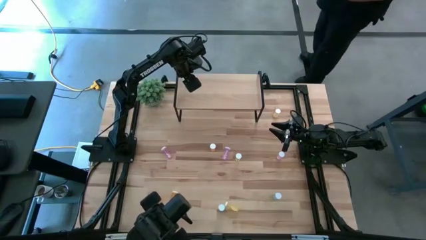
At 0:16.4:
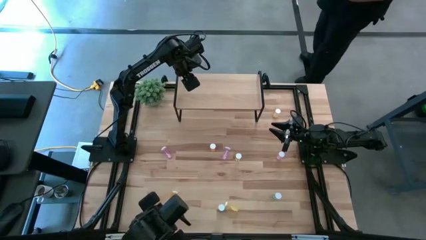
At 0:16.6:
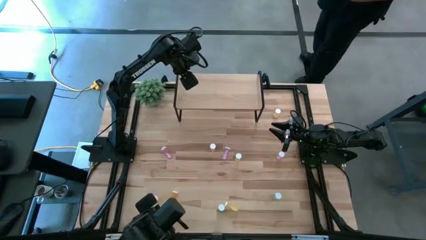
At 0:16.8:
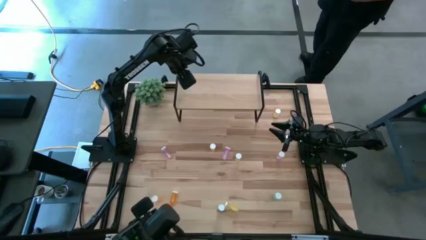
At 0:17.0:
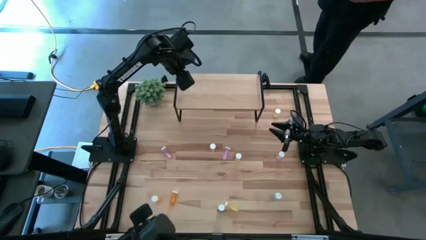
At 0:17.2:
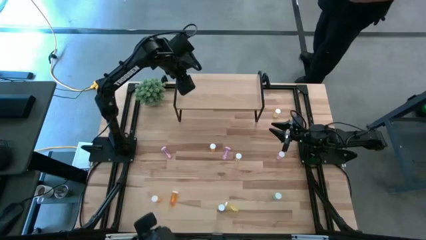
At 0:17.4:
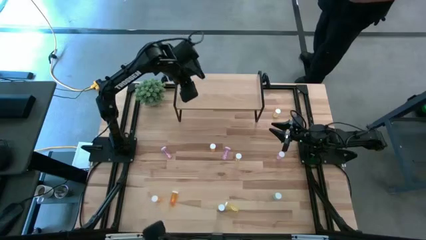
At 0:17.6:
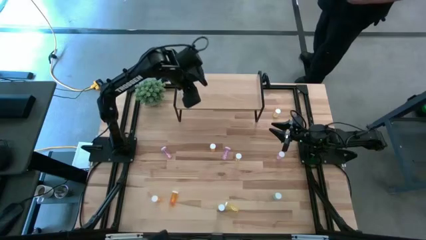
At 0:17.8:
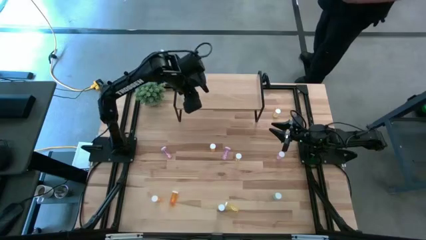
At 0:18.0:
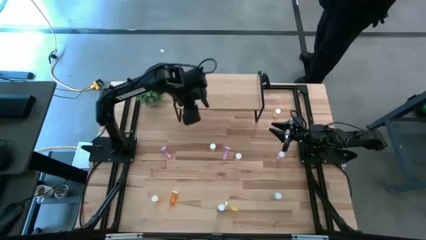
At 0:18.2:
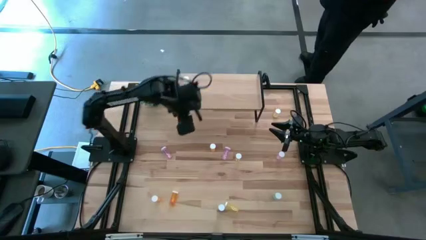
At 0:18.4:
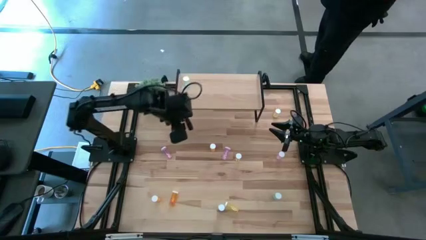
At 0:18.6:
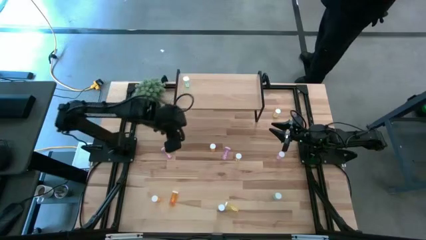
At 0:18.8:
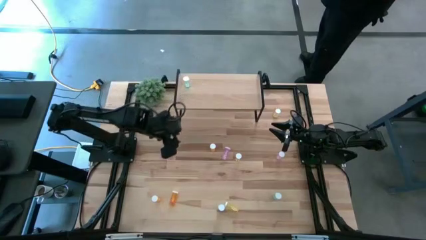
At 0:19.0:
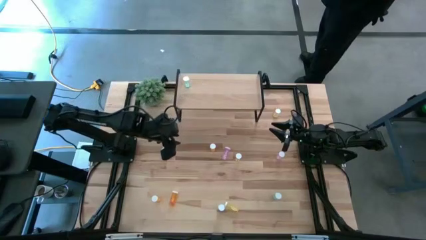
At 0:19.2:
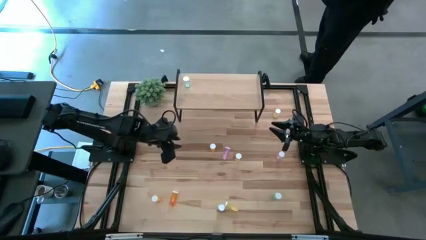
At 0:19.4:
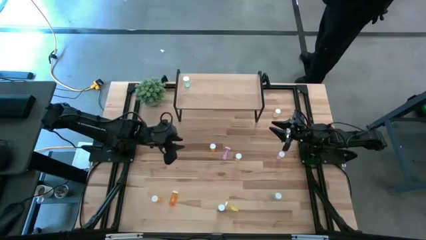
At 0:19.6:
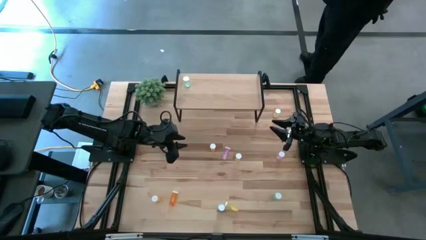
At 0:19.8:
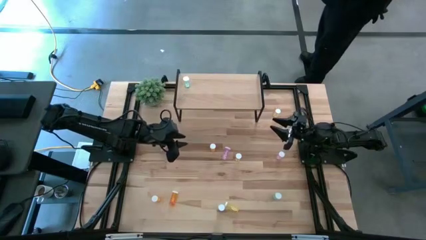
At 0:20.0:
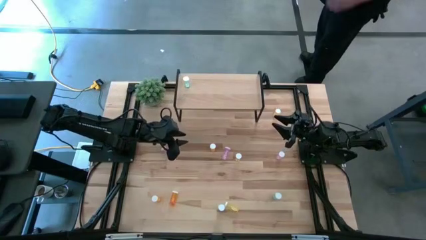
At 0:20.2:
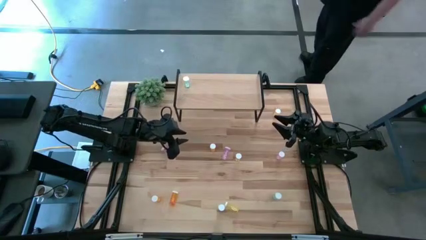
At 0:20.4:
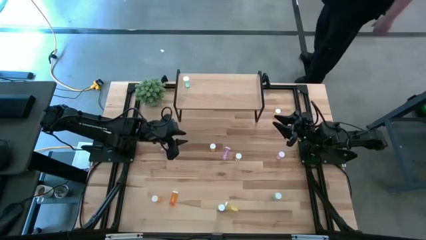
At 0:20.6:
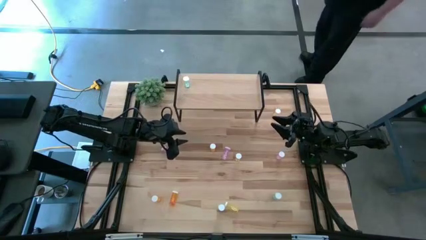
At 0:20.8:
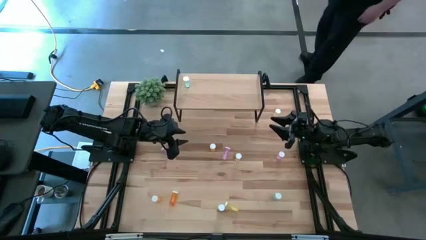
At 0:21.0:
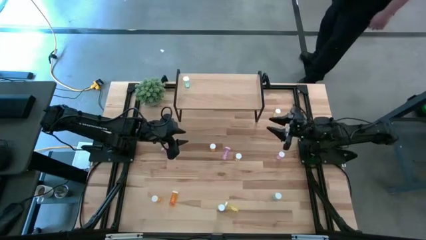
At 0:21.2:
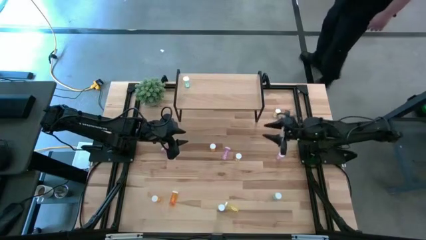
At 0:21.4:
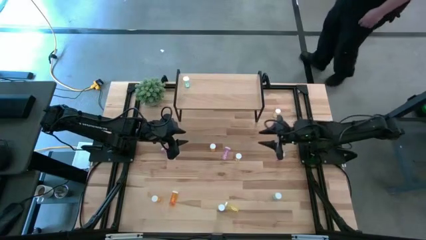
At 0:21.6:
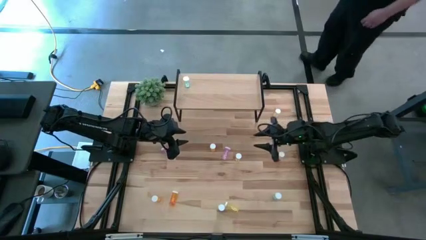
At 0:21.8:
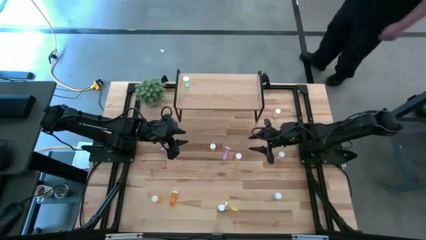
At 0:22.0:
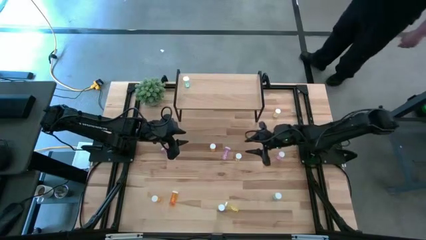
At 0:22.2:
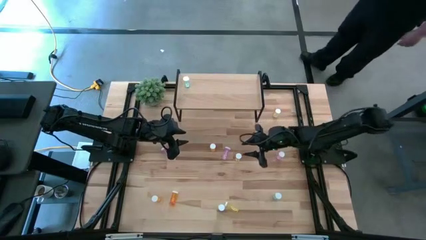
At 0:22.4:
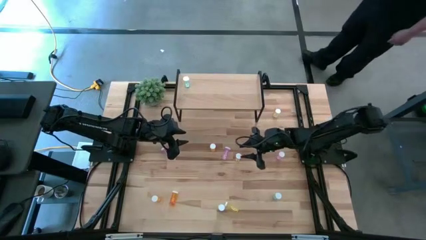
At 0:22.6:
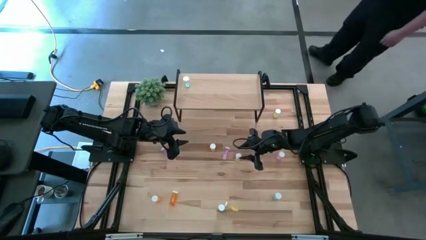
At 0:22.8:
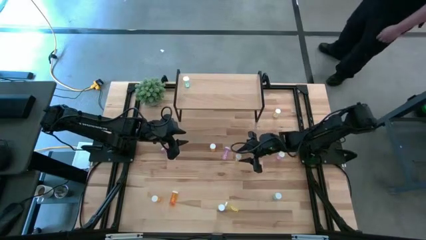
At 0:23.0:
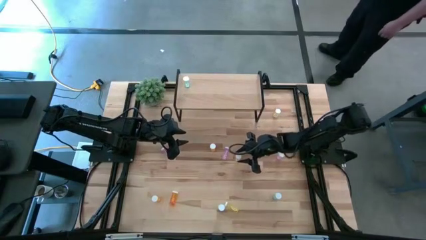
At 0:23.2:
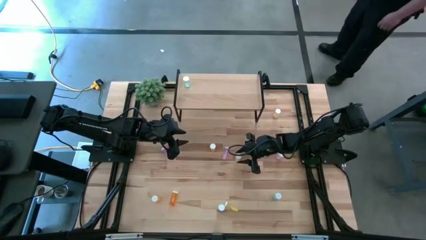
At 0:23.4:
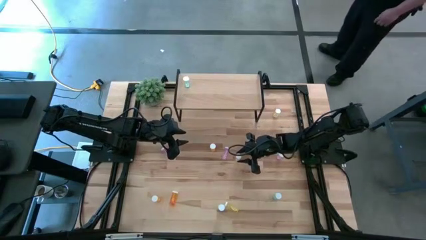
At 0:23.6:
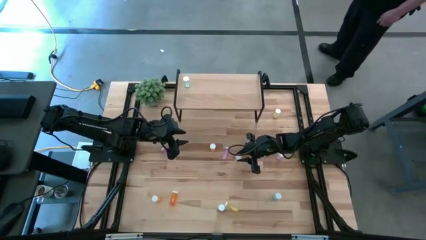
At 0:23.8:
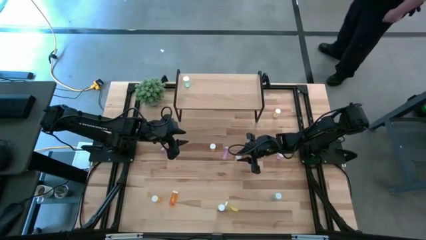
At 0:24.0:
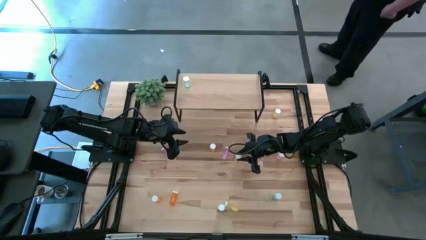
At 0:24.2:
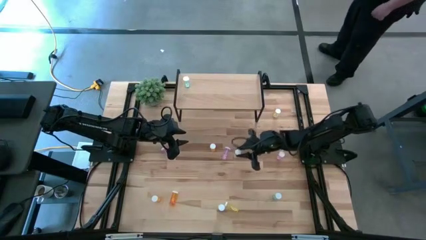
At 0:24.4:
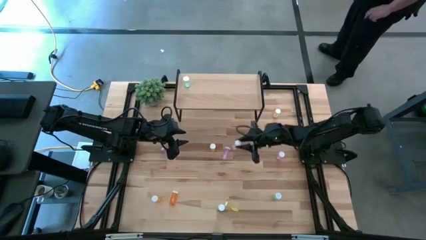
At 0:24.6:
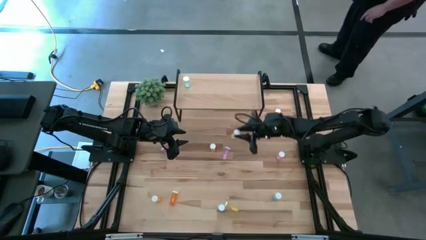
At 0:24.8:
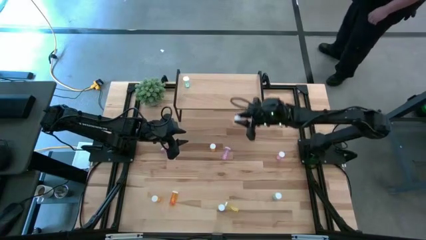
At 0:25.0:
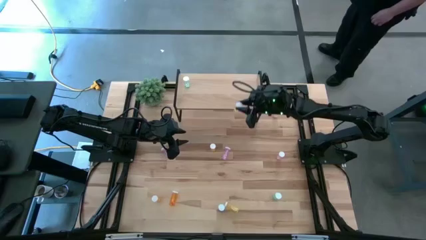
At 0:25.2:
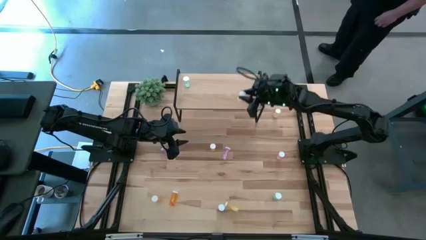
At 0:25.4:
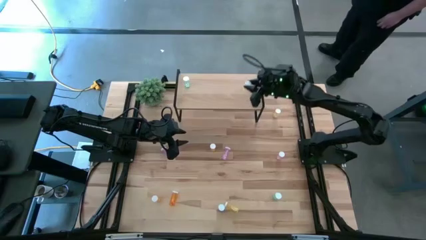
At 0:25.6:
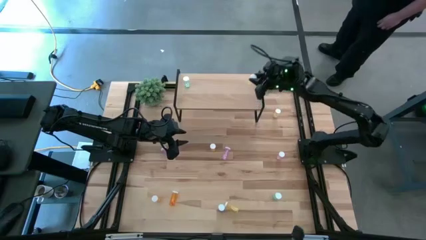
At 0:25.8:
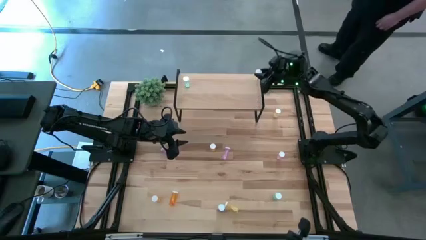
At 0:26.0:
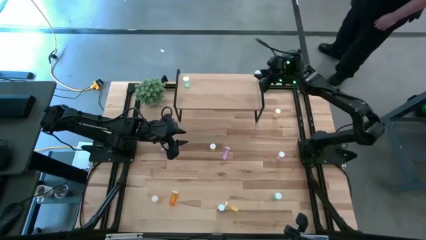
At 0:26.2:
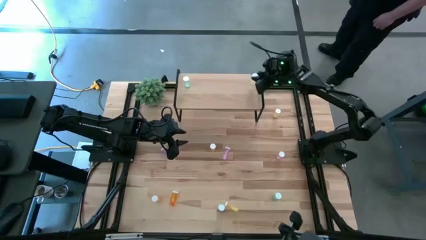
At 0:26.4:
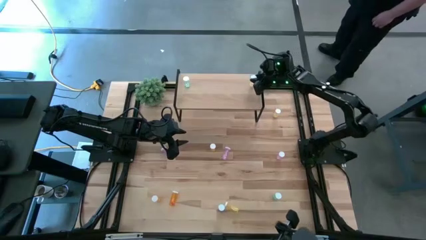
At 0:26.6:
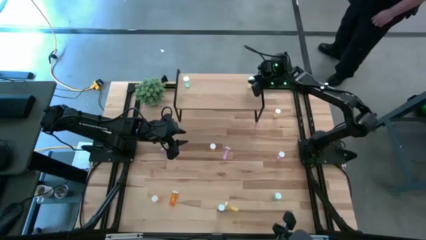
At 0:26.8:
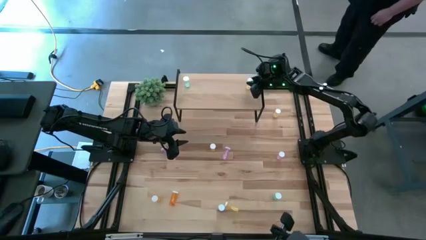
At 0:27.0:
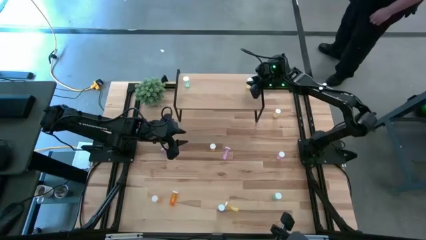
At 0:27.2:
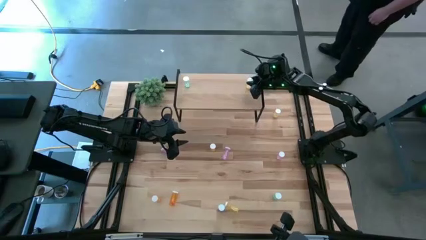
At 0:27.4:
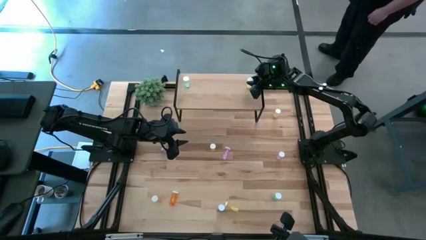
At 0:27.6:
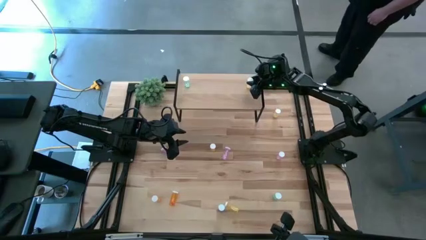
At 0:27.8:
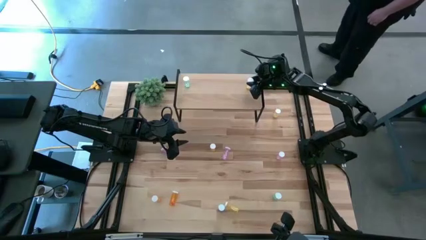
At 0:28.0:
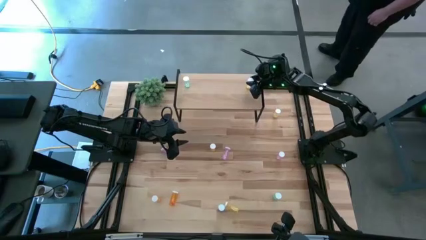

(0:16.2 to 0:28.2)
Task: Pick and place medicine bottles onto shelf by color
Put the middle yellow pill bottle on the shelf

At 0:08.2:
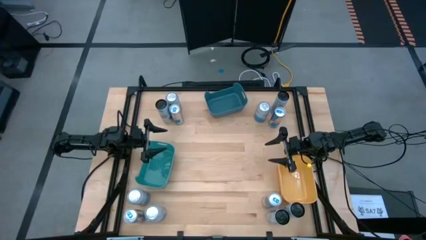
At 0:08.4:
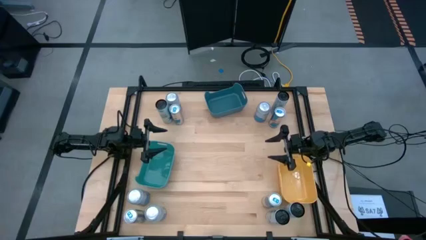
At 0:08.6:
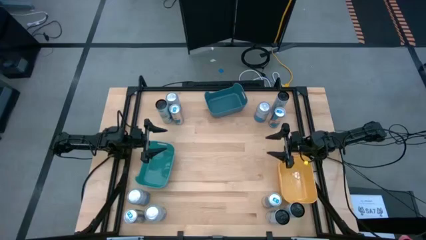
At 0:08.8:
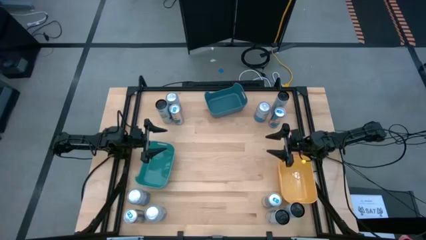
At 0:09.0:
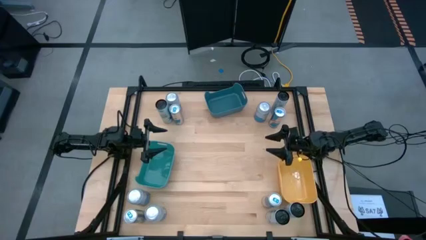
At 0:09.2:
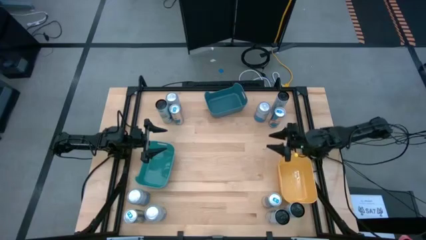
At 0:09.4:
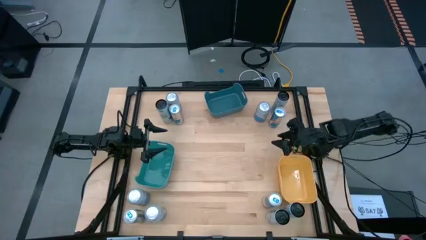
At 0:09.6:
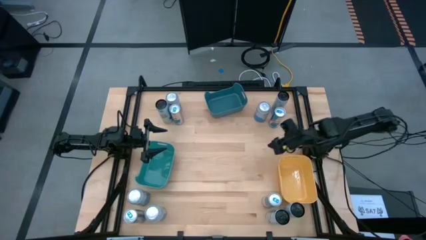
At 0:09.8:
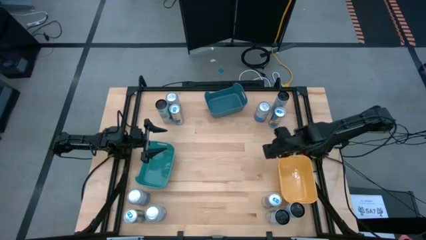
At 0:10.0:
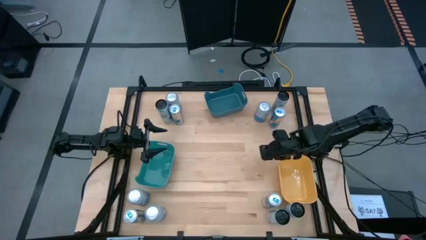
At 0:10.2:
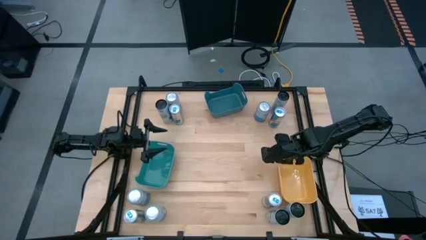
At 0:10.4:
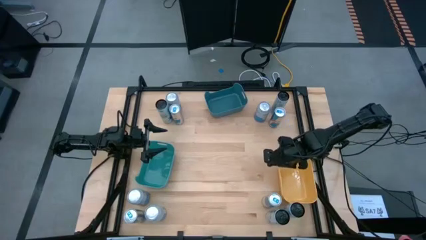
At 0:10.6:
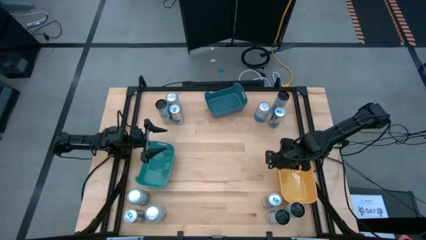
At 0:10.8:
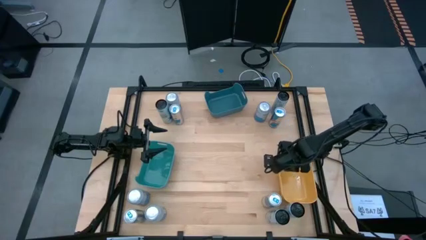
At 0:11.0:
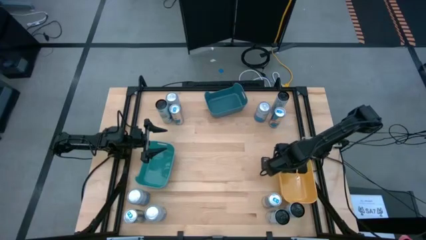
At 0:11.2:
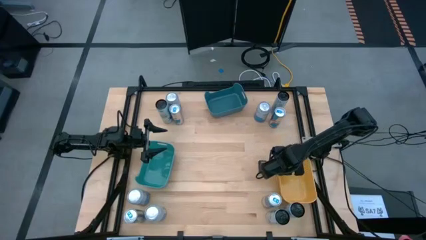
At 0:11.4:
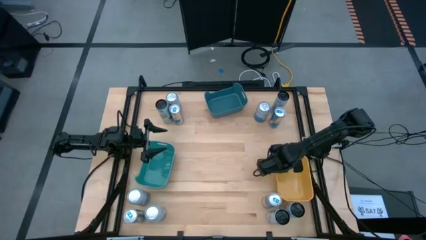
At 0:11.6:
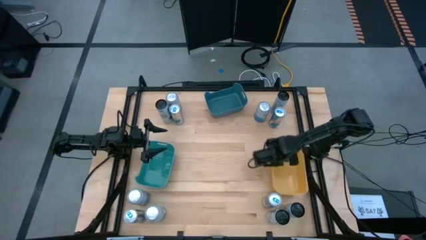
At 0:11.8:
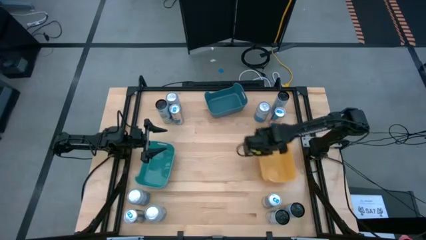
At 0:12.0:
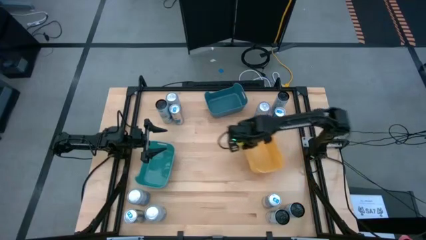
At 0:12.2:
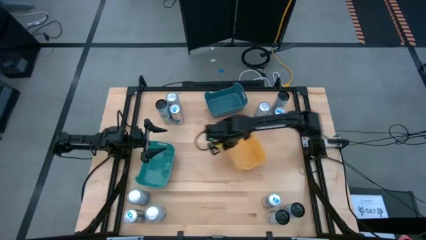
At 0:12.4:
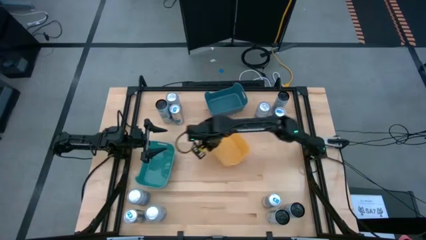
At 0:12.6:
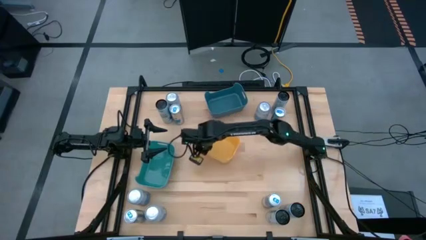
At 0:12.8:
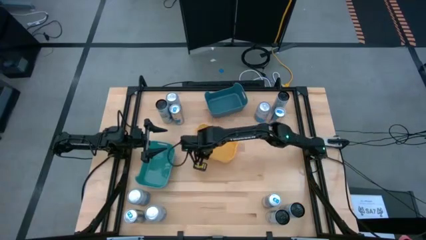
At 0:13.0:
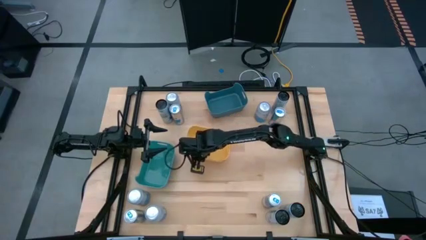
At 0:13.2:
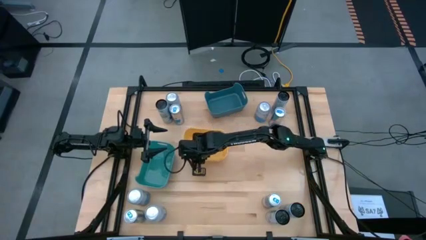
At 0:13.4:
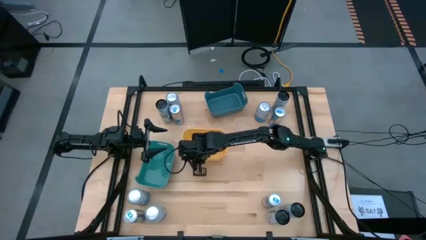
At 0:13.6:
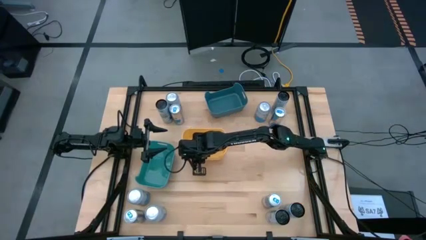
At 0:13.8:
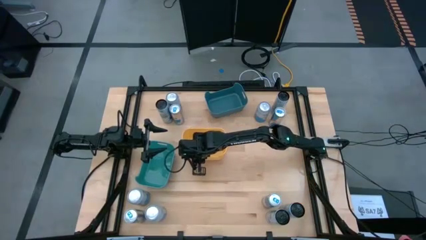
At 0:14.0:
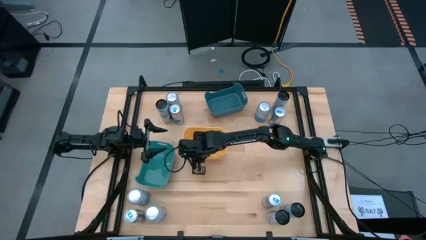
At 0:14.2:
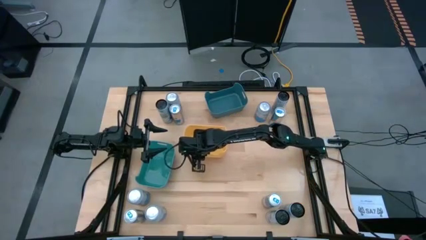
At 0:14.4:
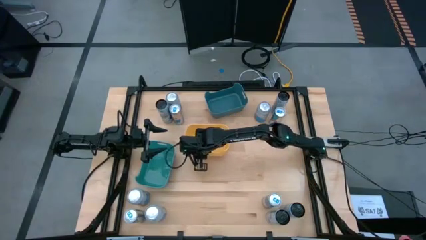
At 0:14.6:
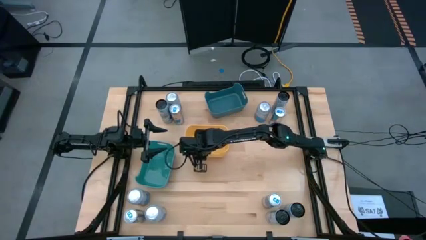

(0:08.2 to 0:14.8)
Task: Sort soda cans
Move the yellow bin to the center of the table
